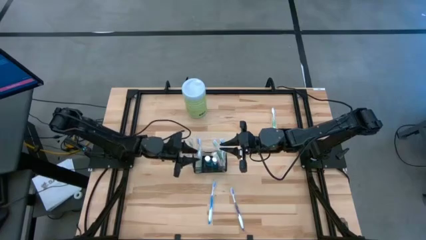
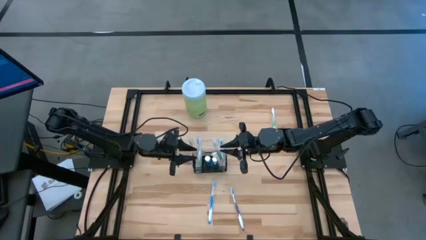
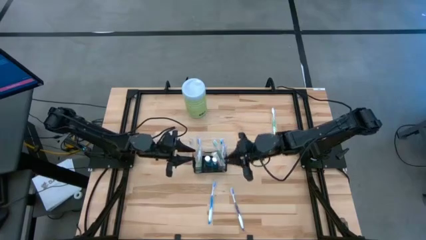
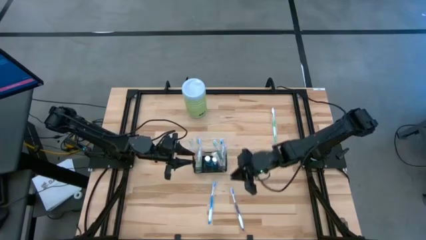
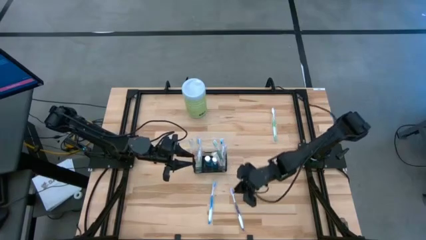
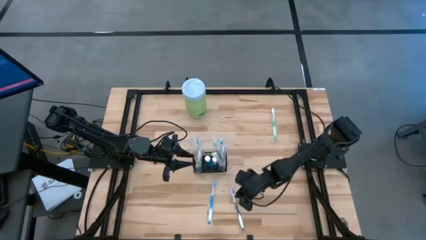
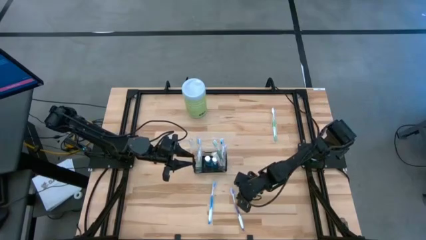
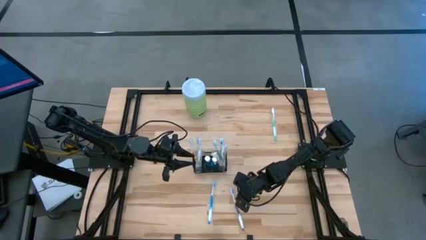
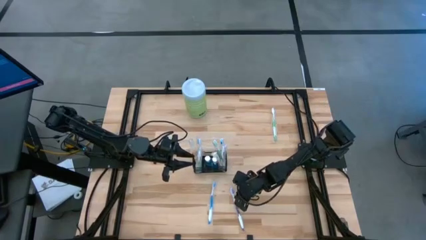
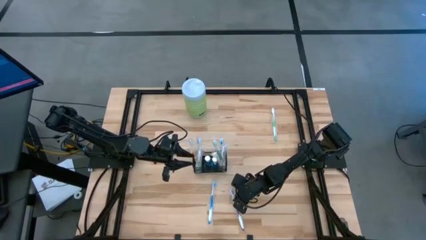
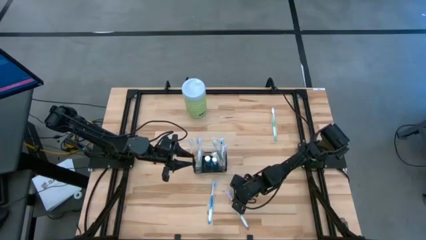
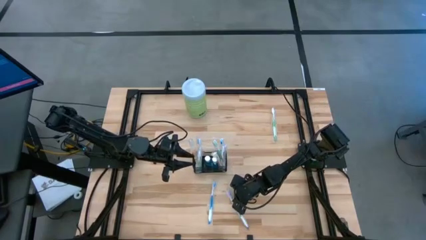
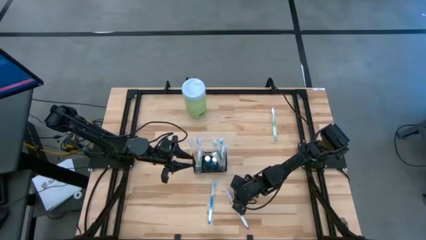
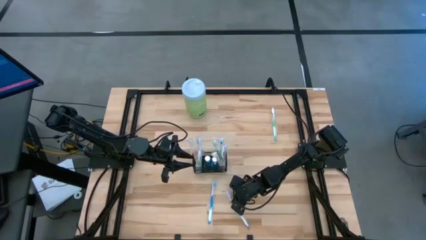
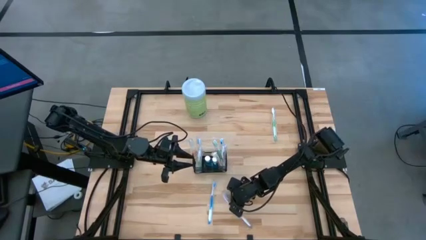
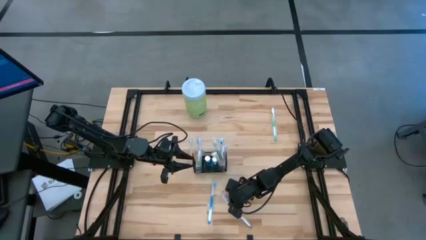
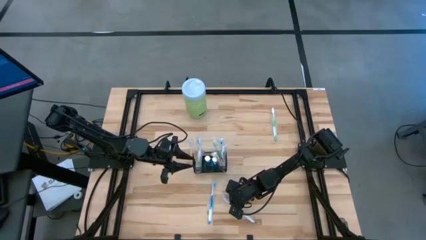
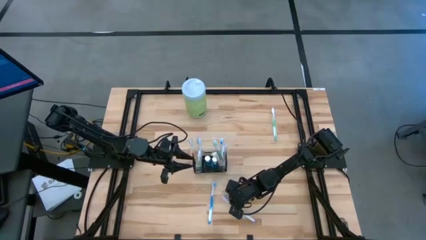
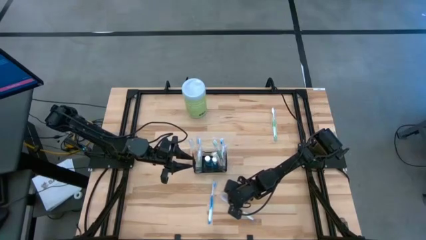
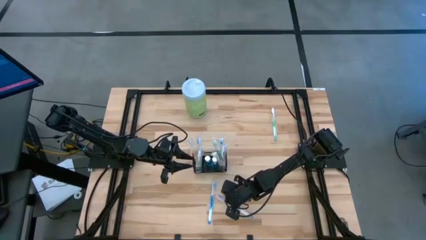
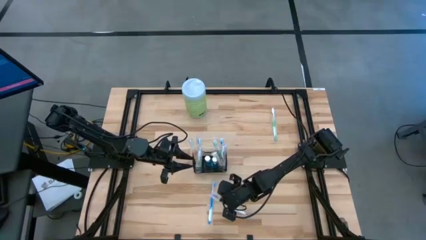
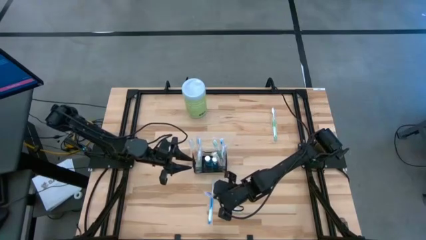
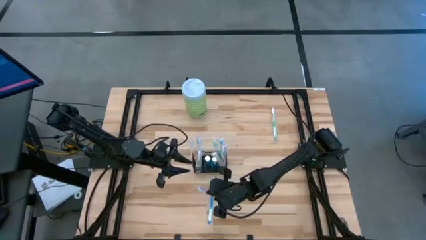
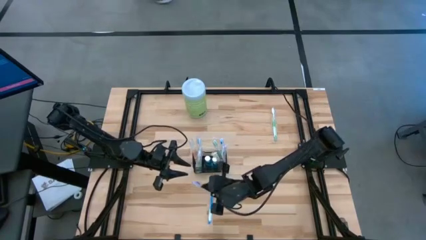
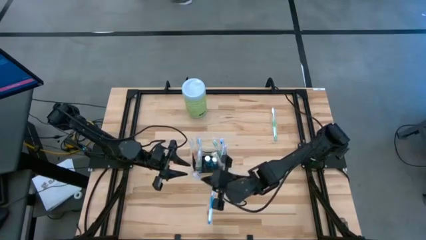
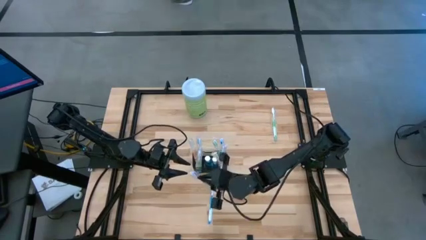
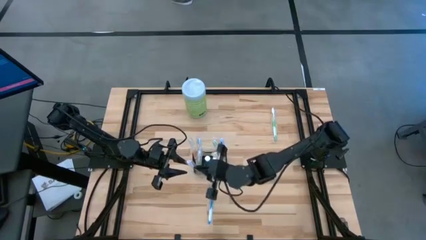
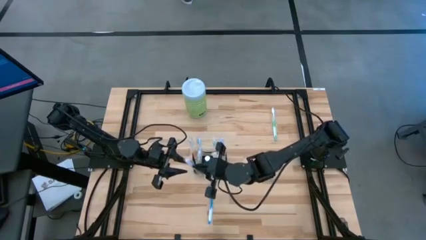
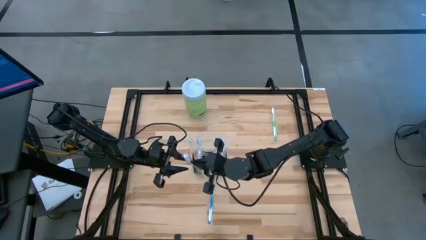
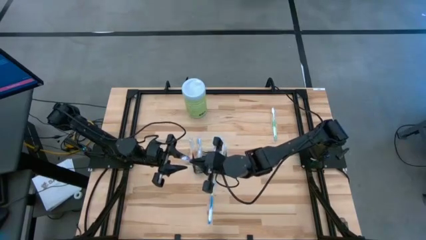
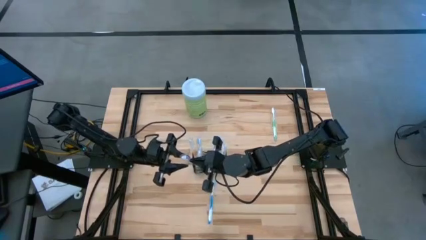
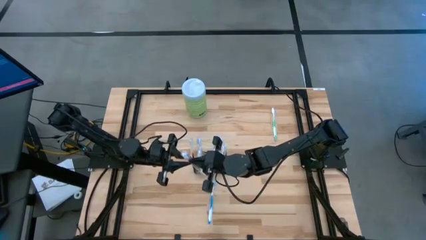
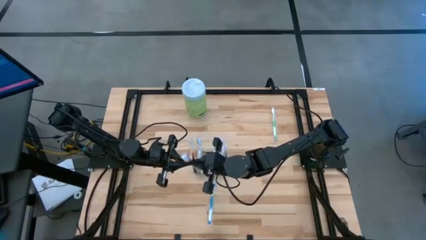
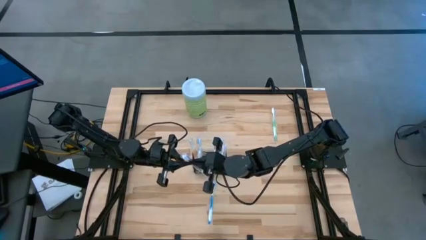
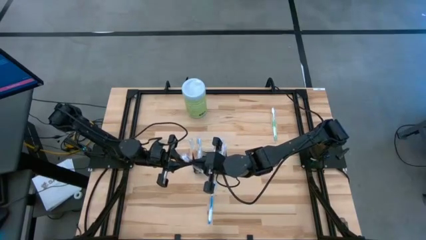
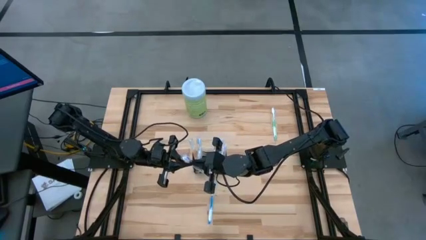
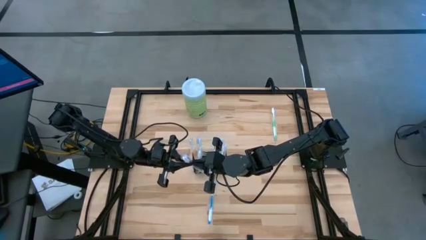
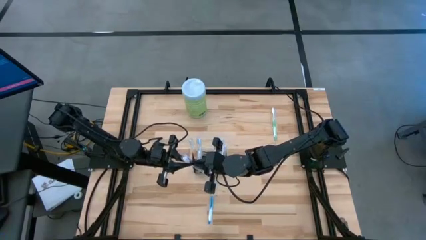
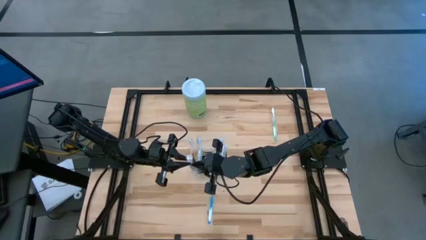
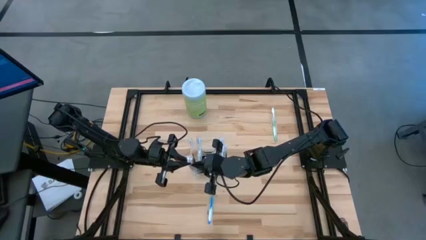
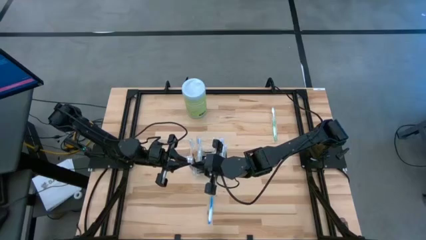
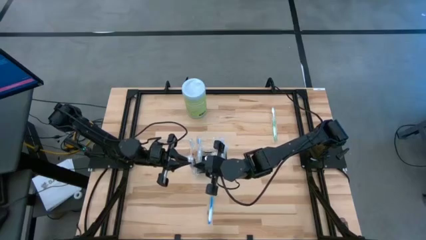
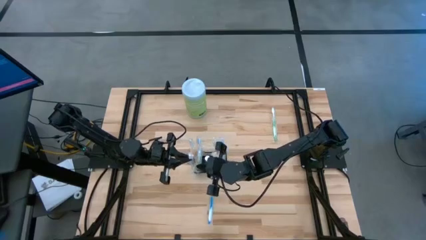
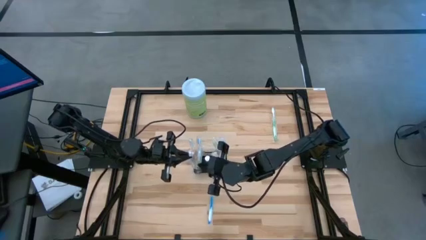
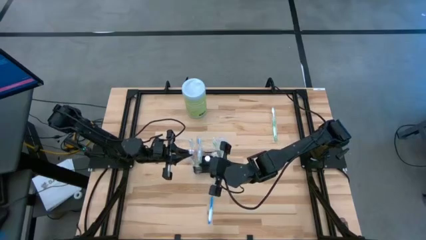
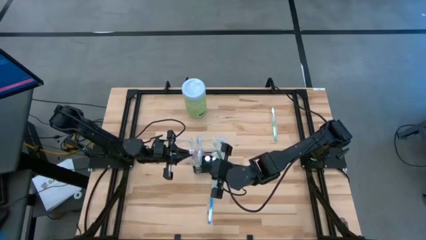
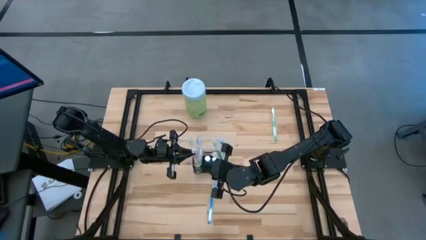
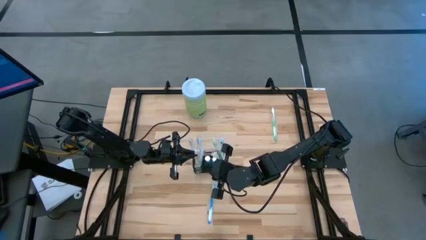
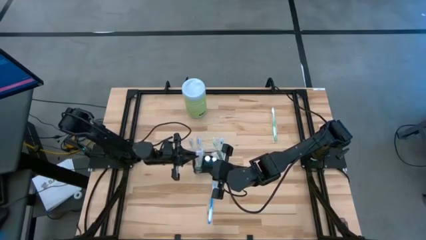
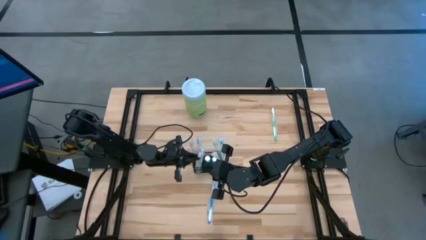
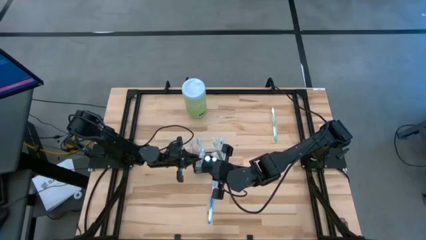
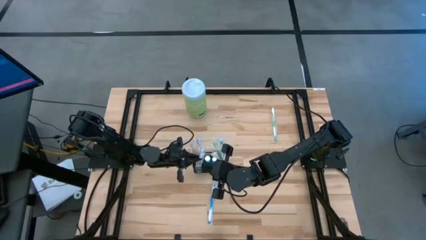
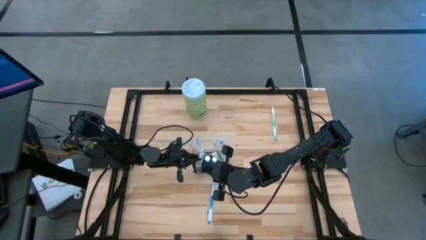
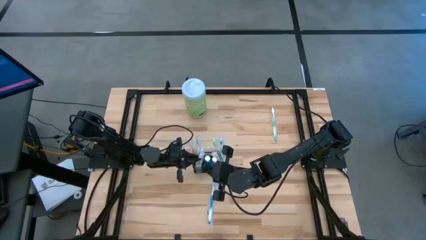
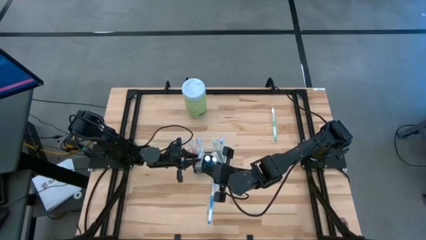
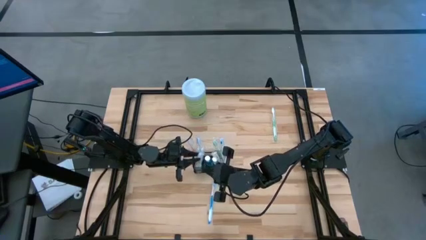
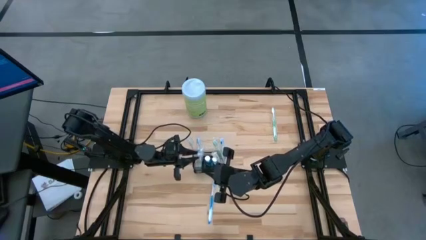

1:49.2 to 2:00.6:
Task: Pick & Place toothbrushing station
Put the purple toothbrush into the wire organizer
